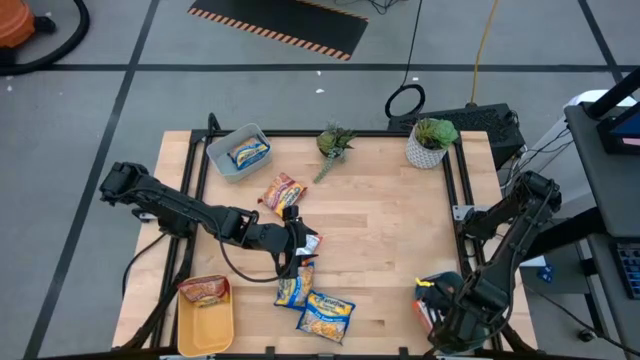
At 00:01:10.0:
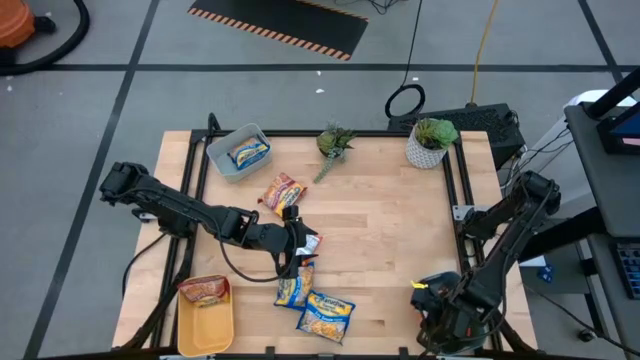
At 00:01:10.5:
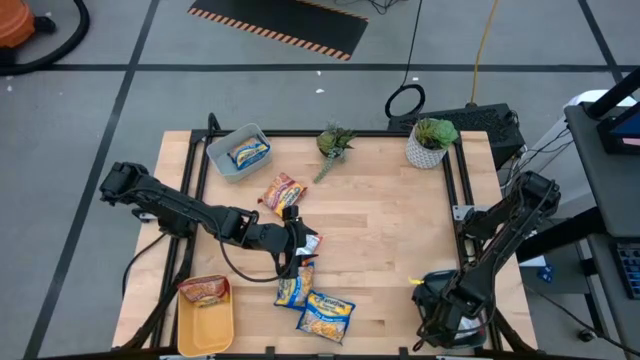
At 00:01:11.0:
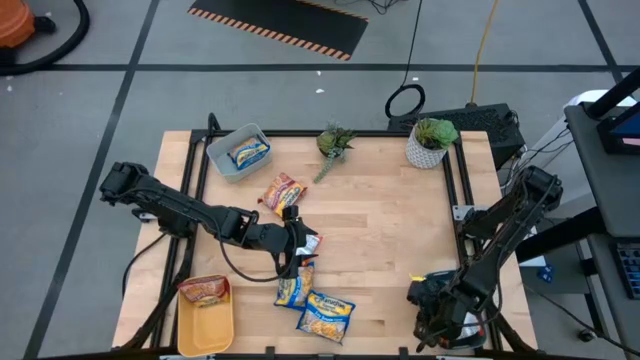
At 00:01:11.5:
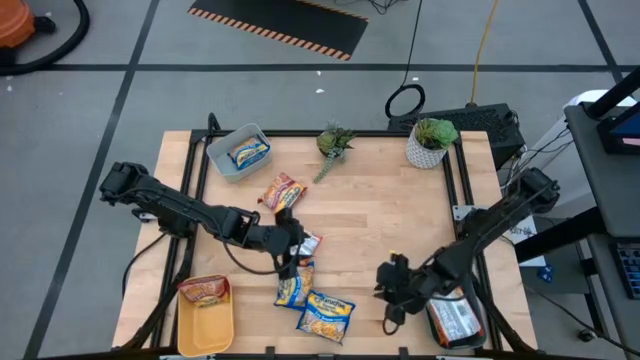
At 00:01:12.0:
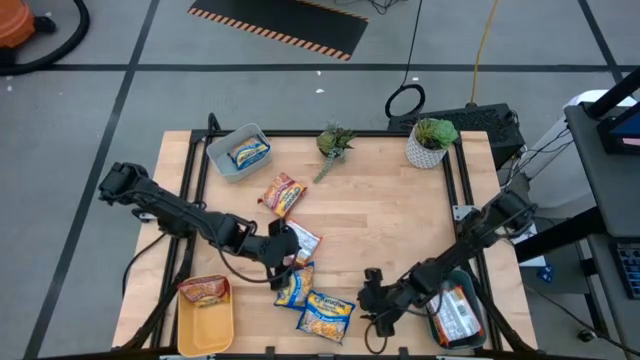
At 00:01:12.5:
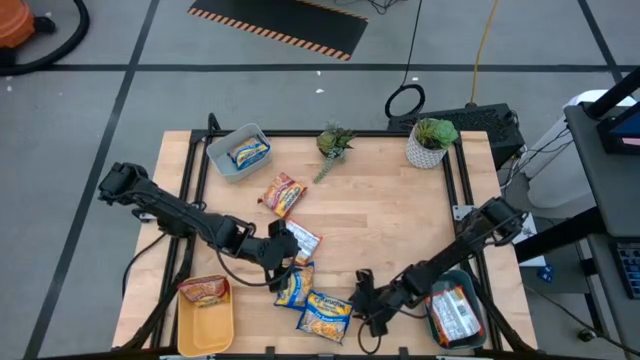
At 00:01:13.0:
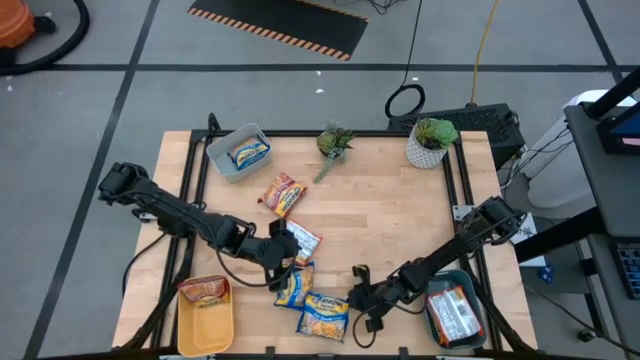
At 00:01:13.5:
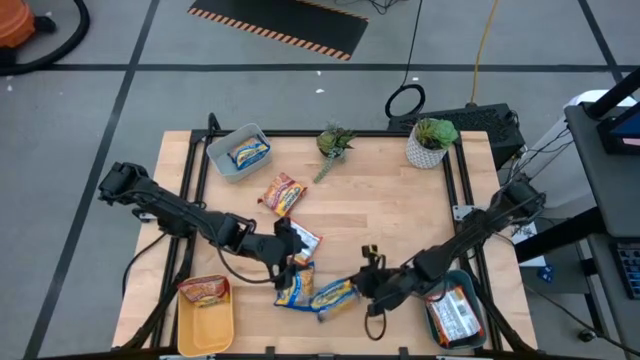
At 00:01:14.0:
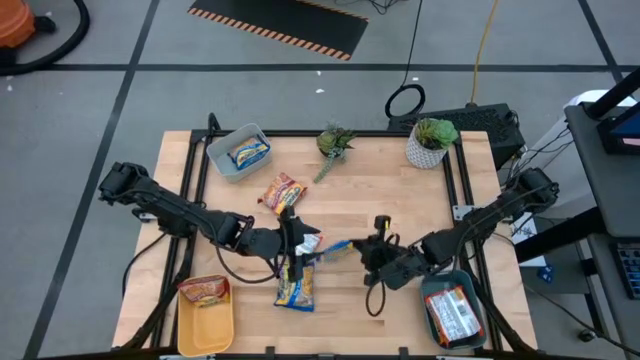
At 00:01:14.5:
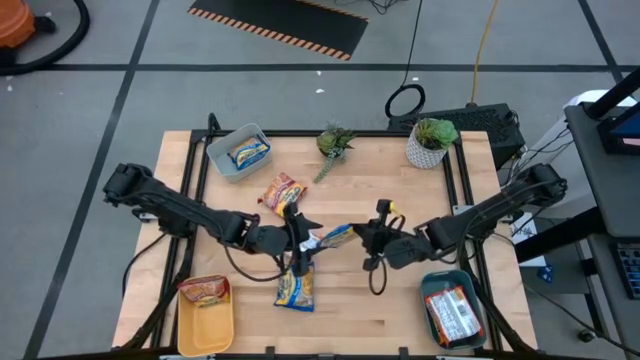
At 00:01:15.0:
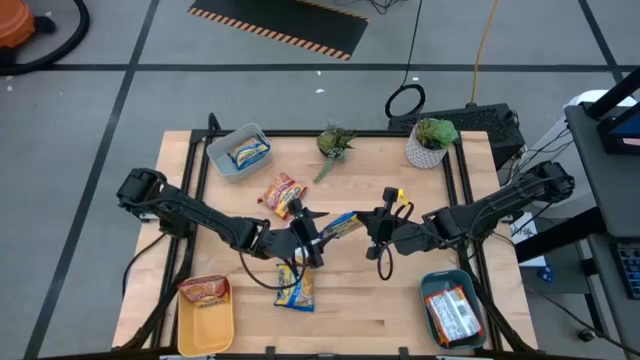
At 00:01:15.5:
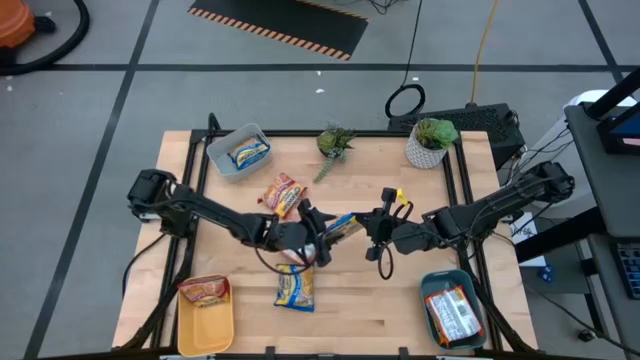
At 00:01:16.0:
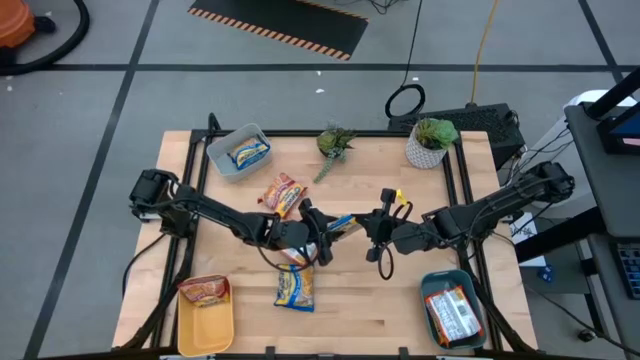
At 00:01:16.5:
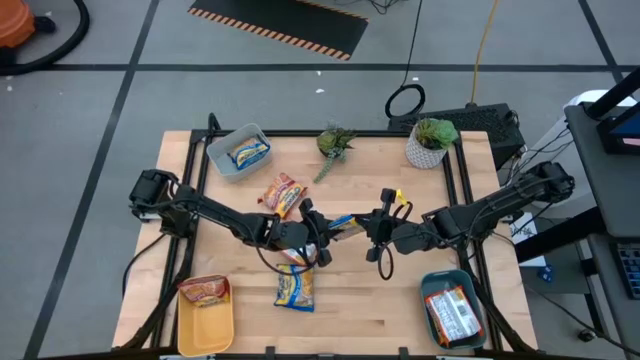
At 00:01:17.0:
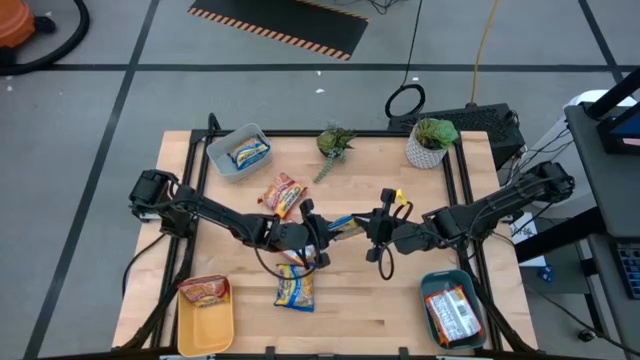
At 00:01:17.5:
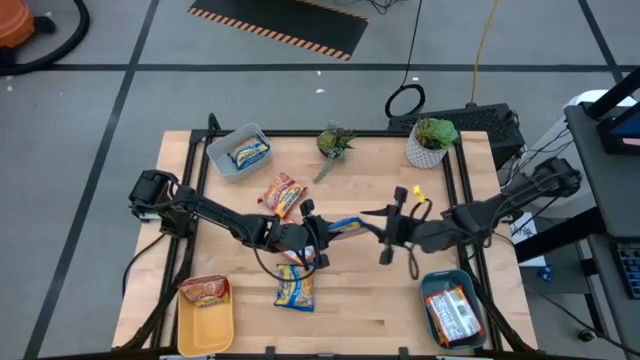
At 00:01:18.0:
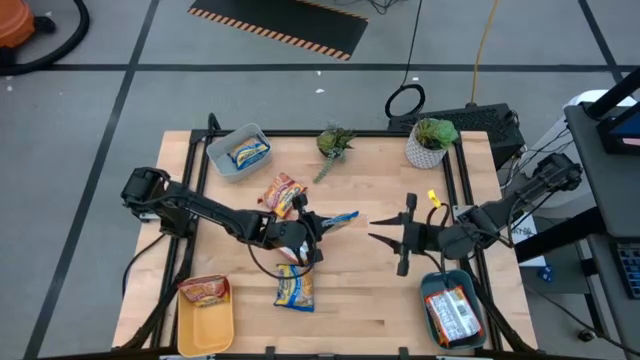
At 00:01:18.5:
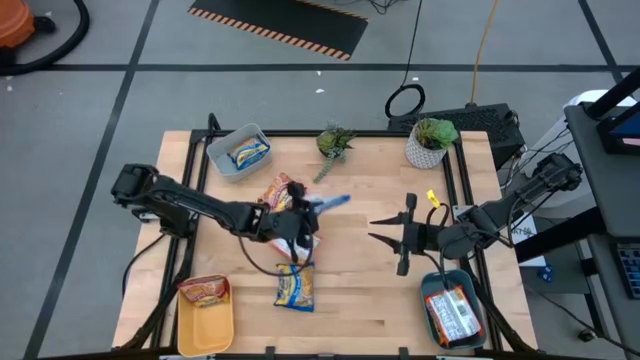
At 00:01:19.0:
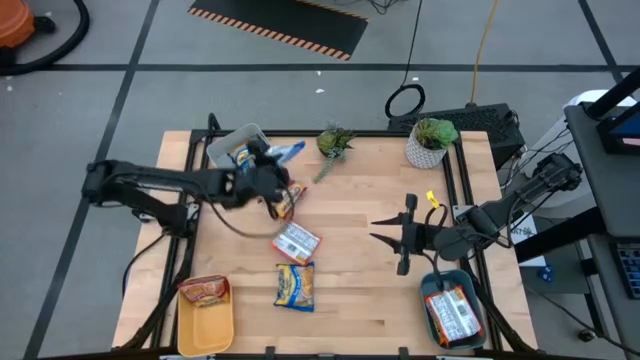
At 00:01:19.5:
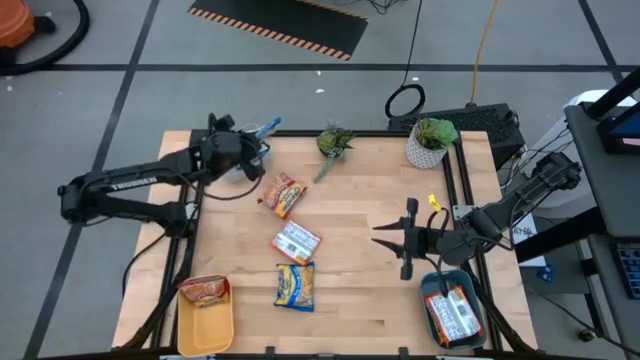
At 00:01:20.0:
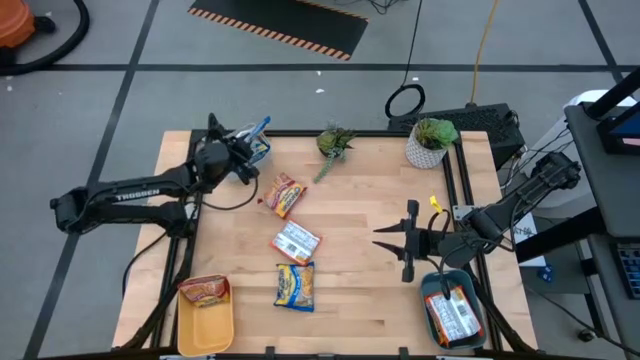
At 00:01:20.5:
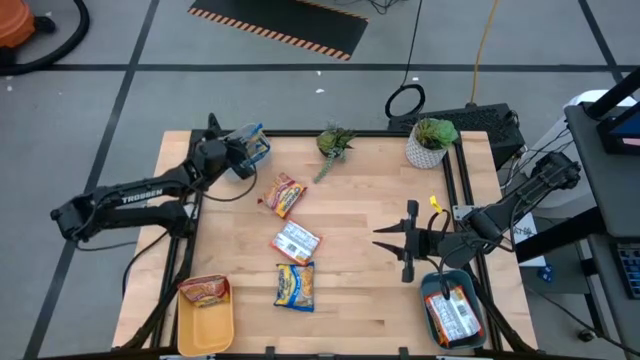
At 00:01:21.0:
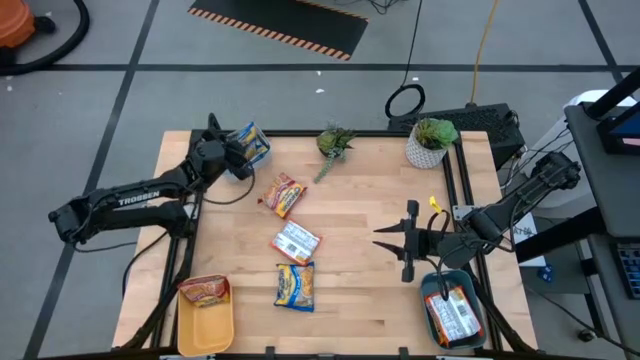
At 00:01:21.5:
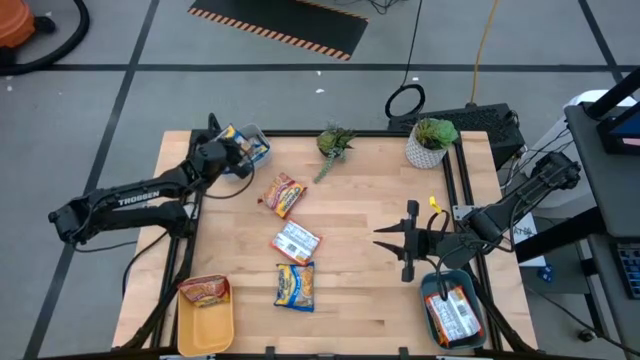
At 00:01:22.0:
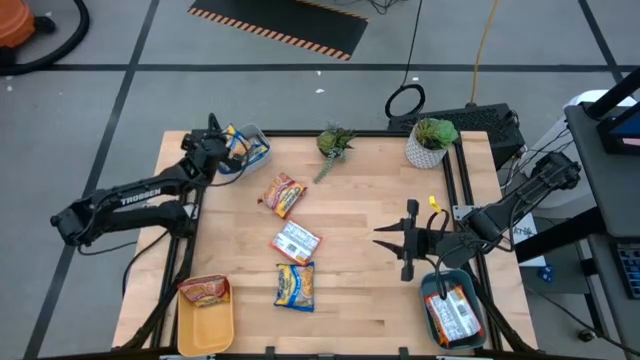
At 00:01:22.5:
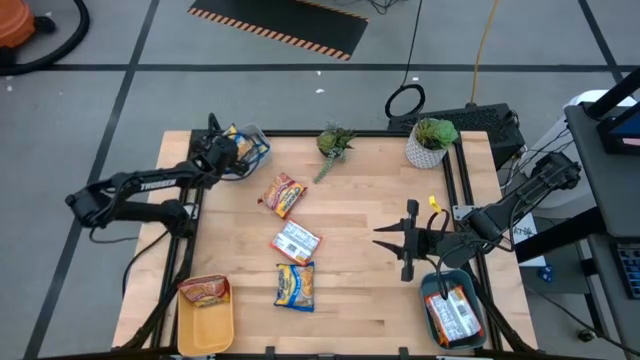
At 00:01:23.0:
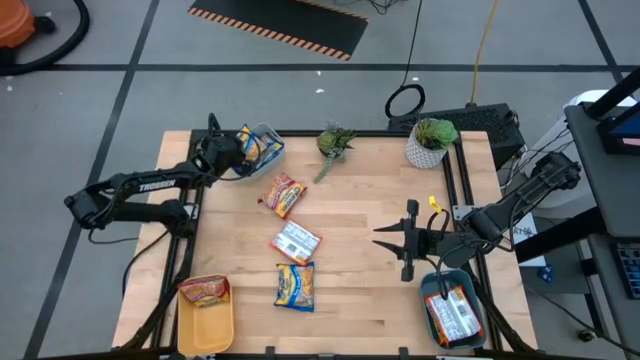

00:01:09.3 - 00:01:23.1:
Task: Sort Maruchan noodles
Put the right blue noodle pack into the gray bin

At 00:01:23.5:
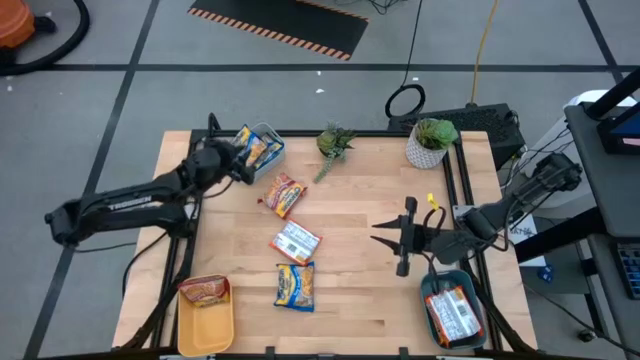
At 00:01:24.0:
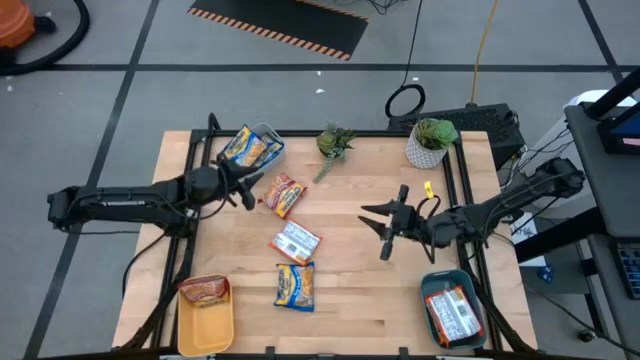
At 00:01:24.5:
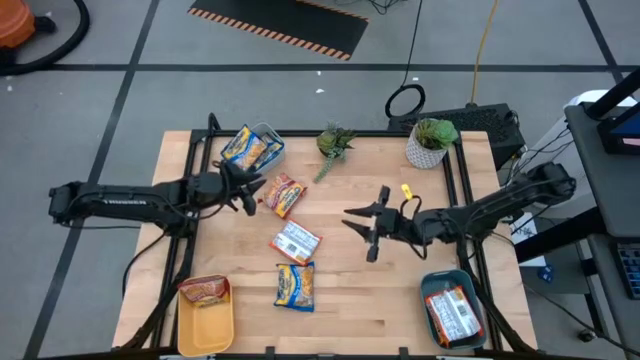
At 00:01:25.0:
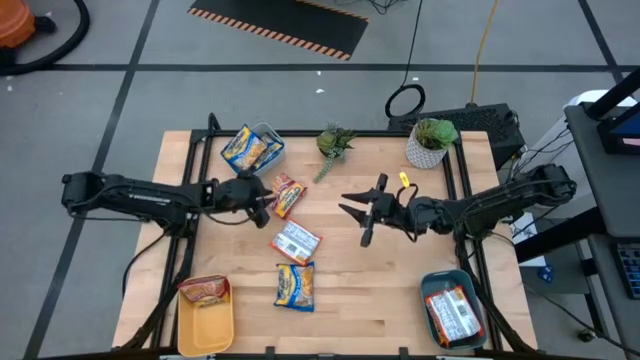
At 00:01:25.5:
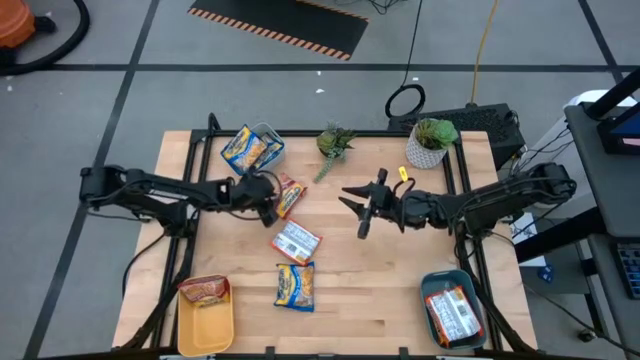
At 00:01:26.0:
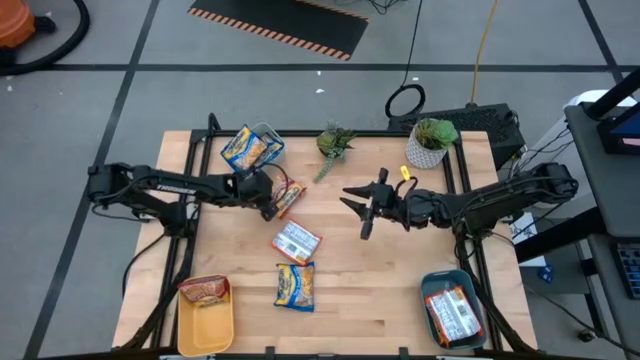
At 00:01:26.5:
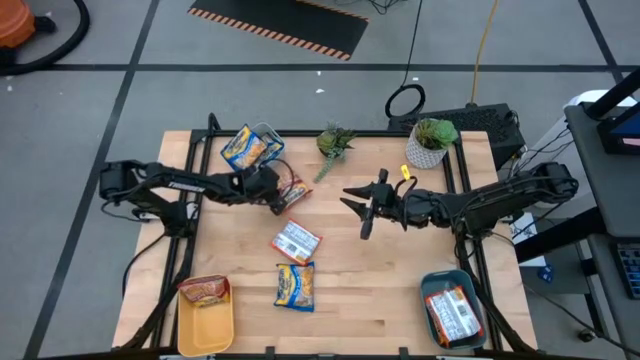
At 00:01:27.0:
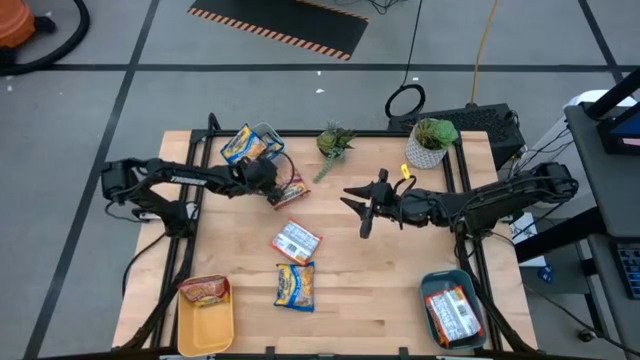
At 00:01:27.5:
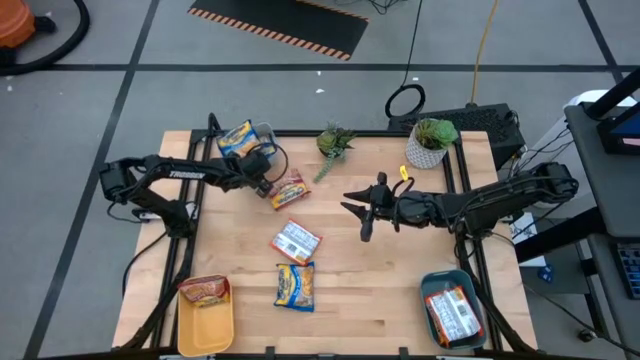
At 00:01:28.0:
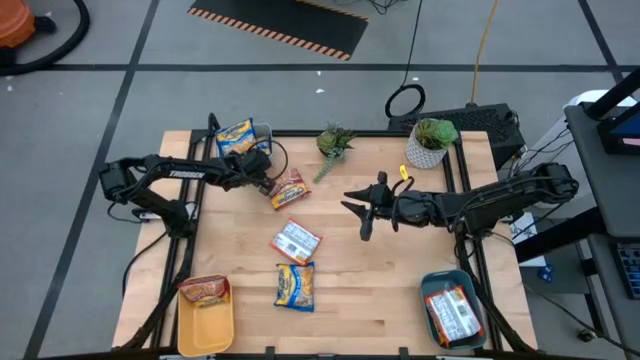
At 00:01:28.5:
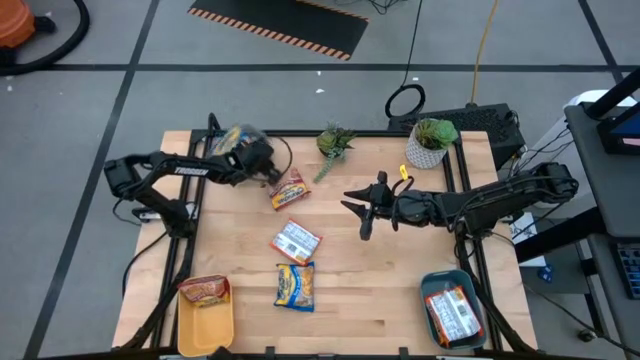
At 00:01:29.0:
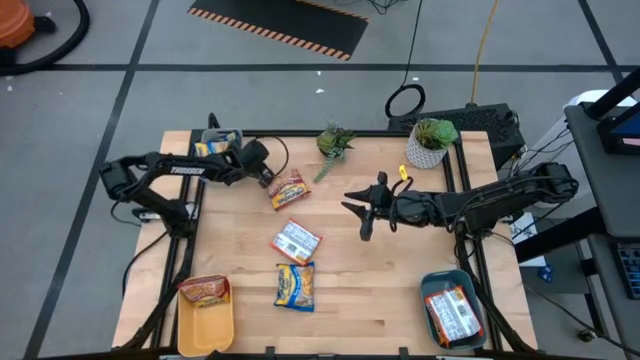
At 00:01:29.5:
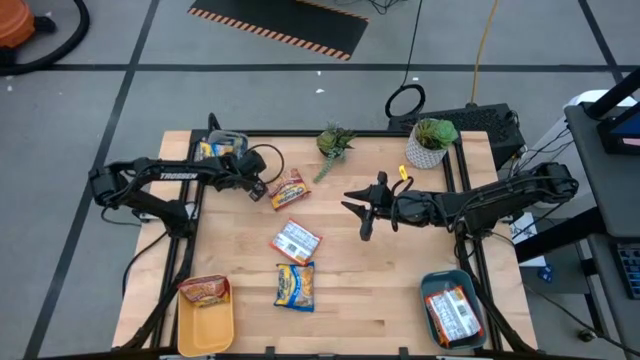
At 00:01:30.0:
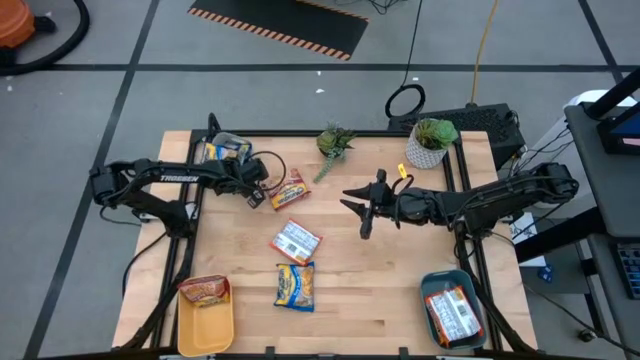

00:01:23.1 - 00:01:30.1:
Adjust the gray bin
